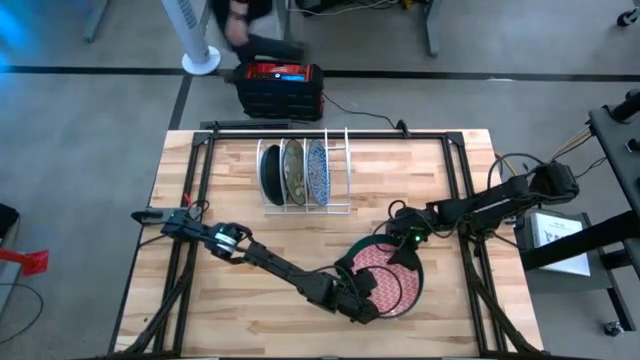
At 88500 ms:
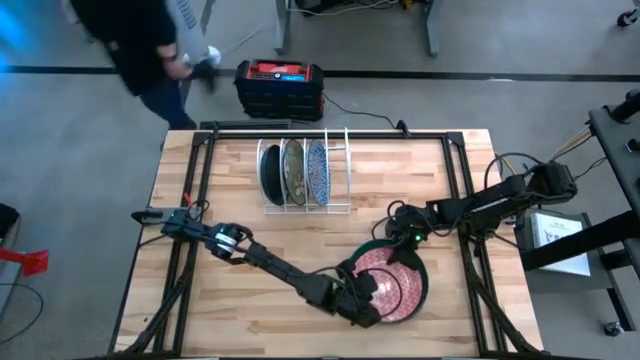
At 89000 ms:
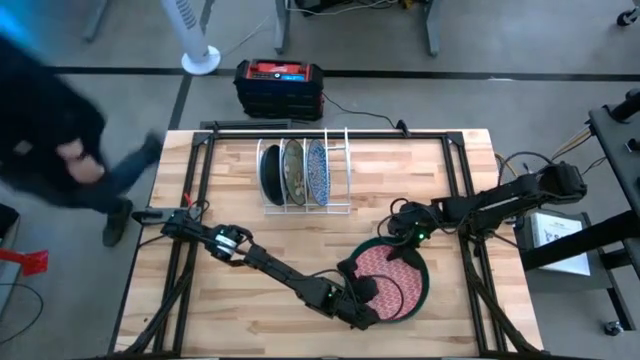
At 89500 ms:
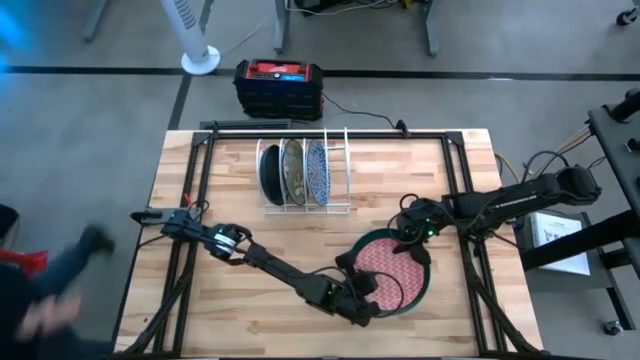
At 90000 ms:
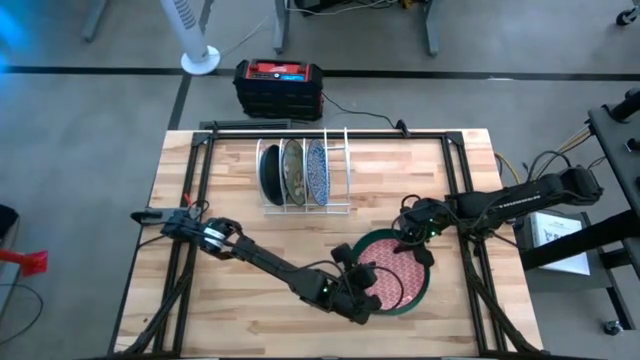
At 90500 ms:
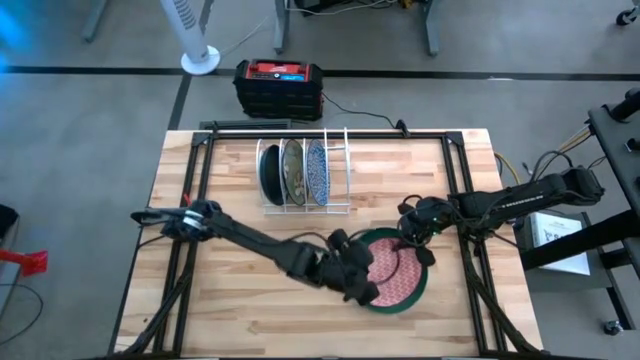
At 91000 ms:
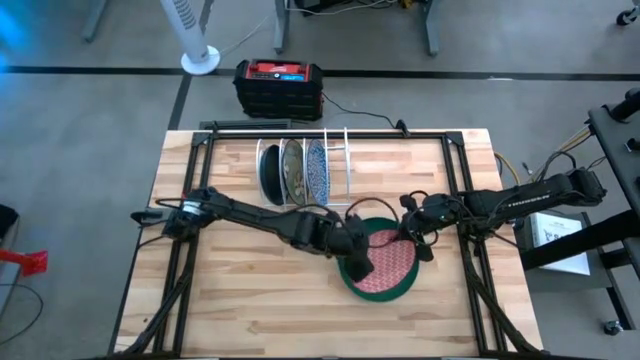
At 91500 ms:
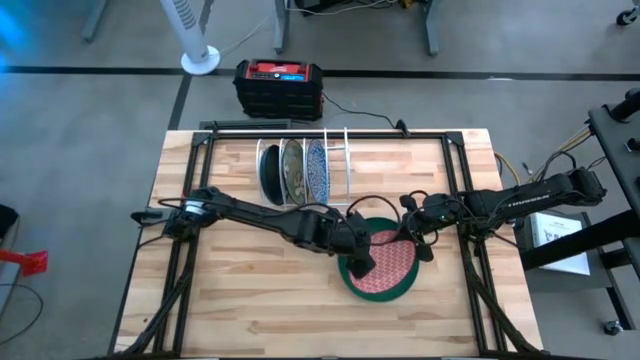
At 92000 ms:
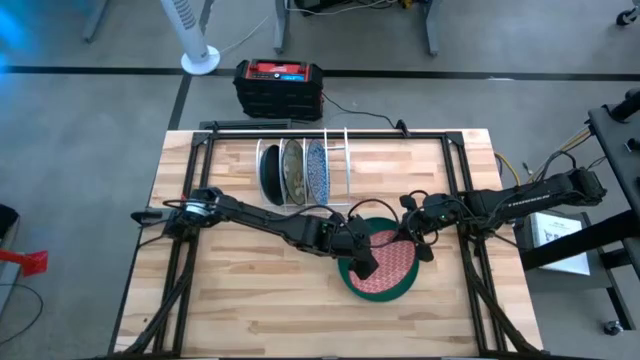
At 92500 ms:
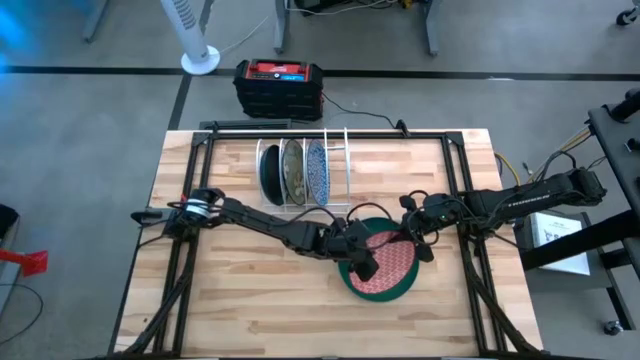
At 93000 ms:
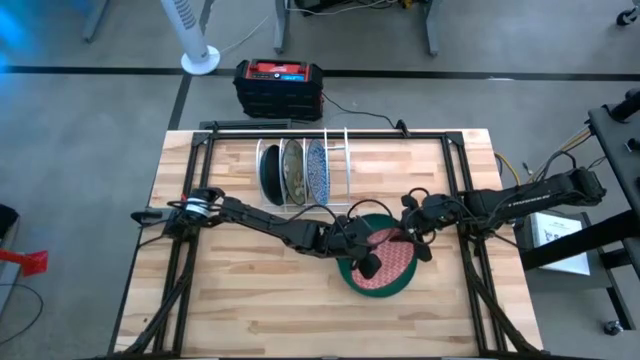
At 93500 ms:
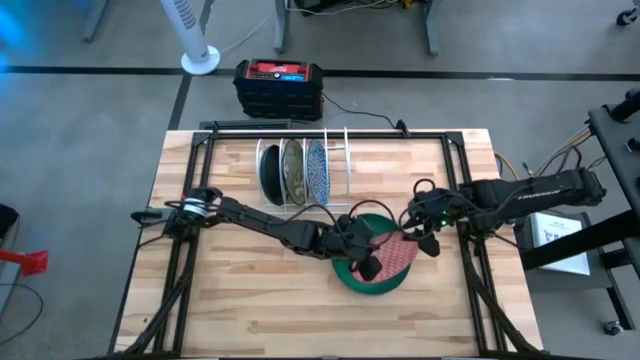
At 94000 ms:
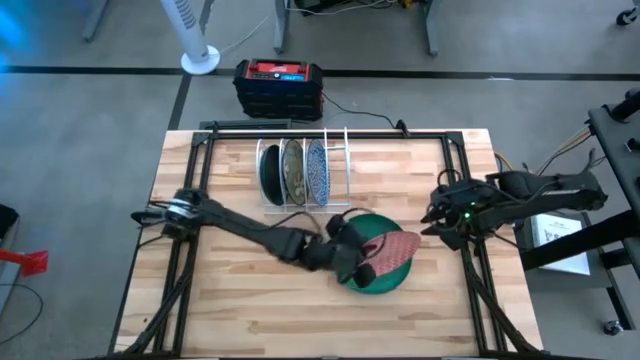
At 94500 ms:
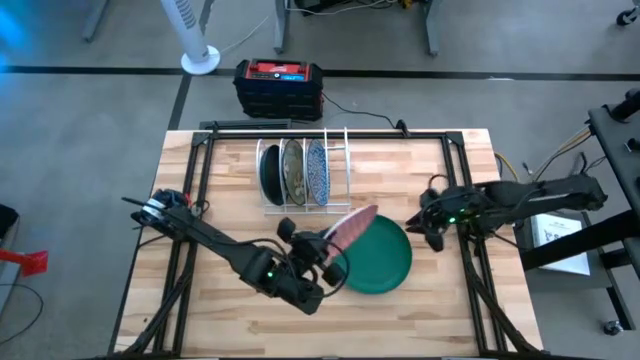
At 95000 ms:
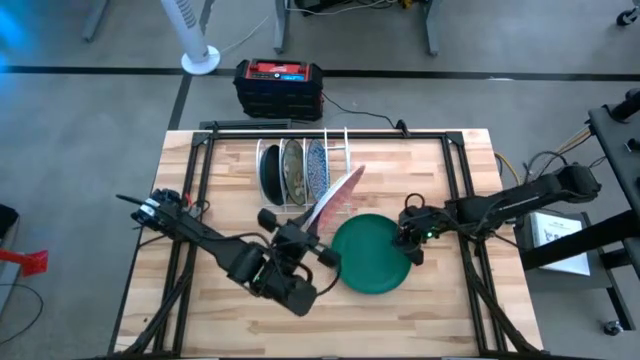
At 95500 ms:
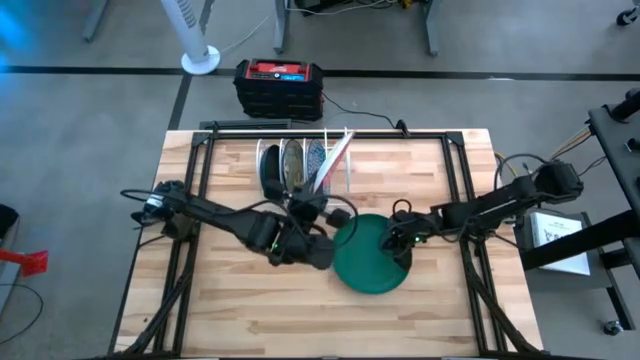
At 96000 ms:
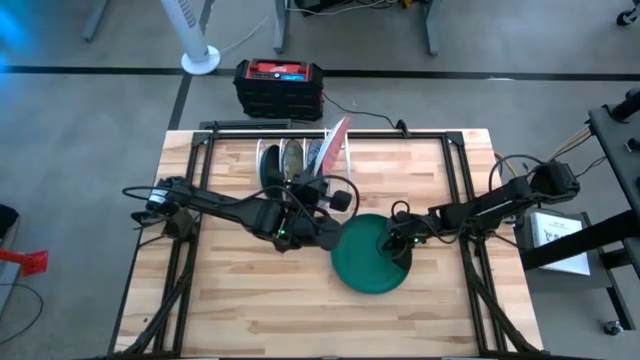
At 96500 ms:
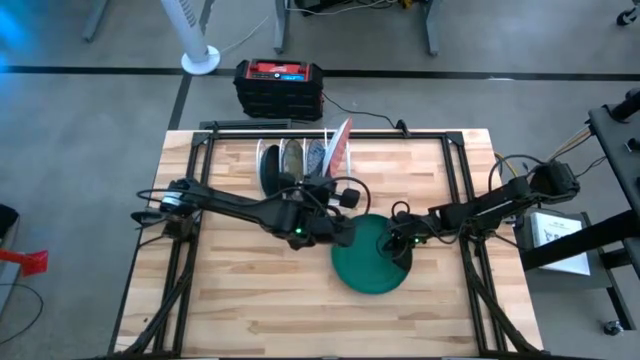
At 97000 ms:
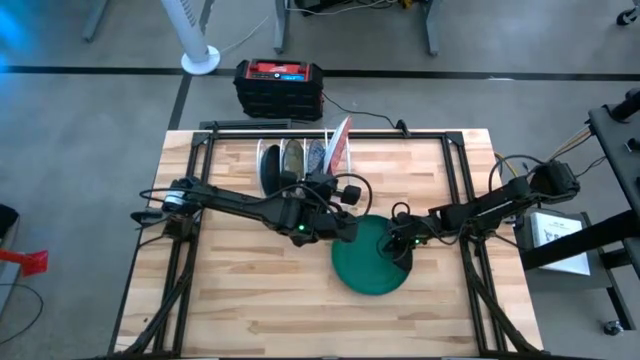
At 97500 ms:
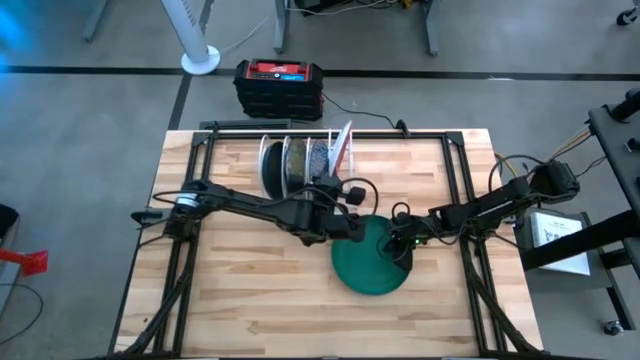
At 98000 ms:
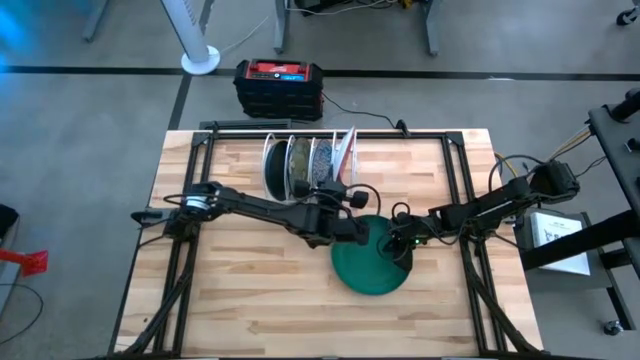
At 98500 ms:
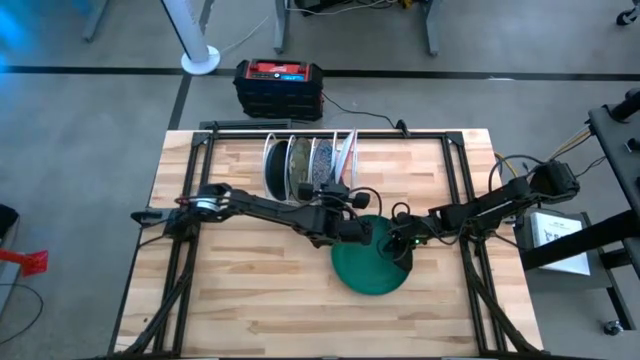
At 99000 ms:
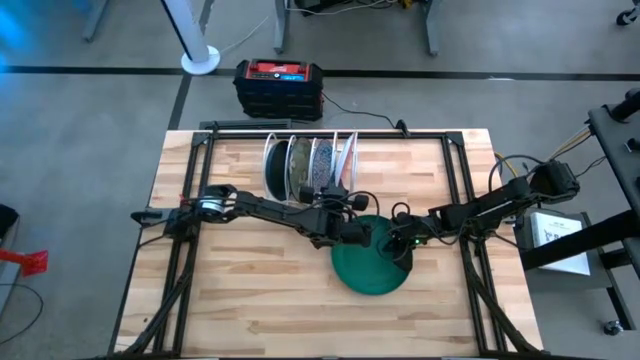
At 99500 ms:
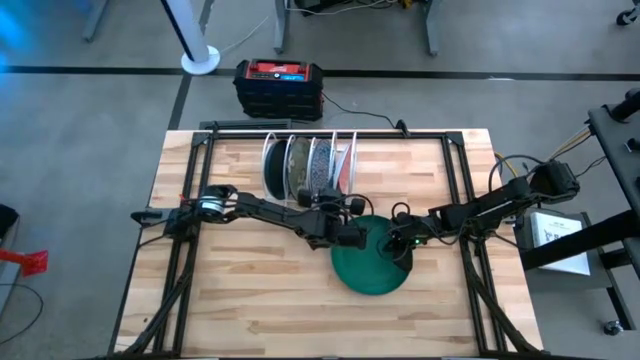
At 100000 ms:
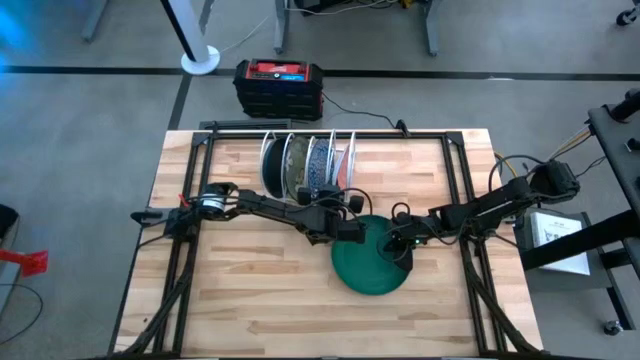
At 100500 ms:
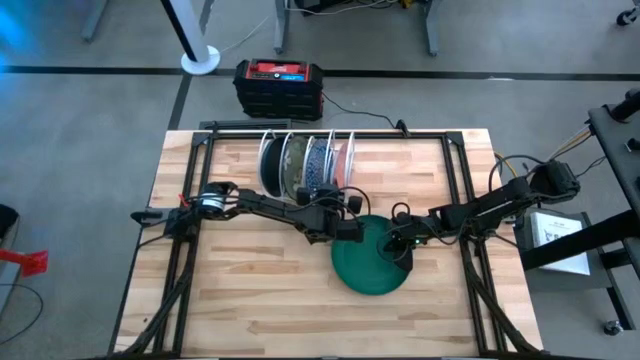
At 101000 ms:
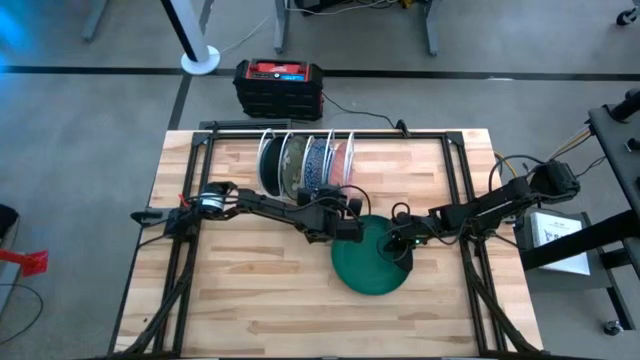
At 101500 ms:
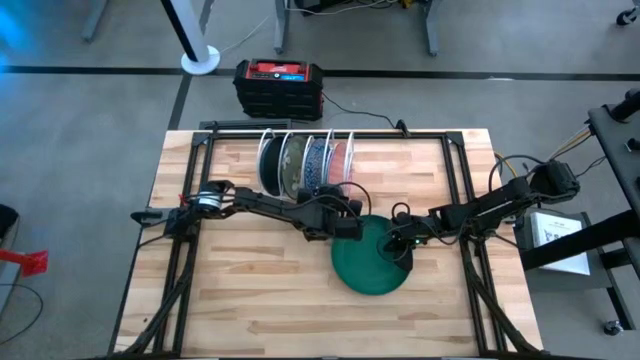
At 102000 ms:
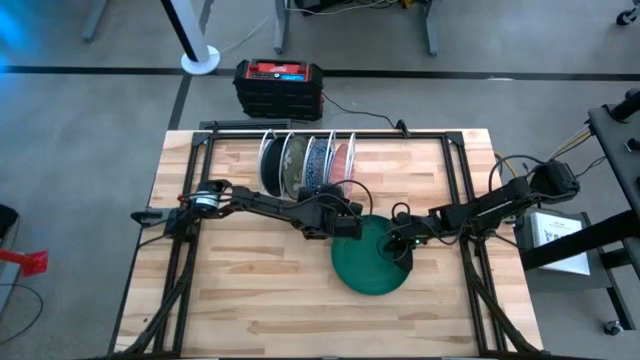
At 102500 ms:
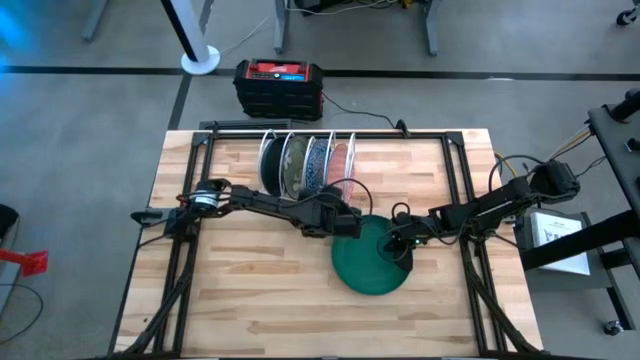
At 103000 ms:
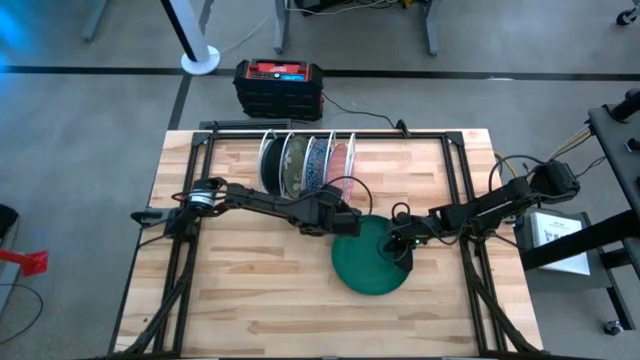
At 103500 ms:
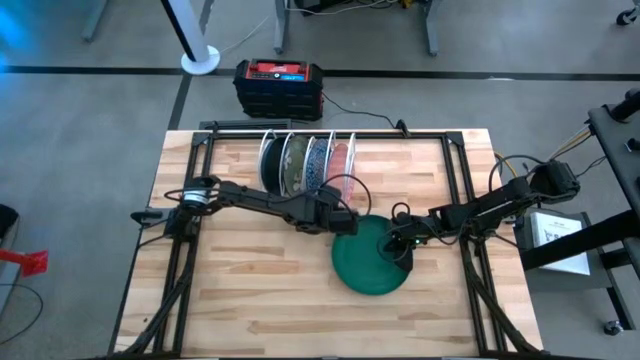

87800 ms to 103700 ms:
Task: Sort dishes
Put the orange pattern plate into the white dish rack

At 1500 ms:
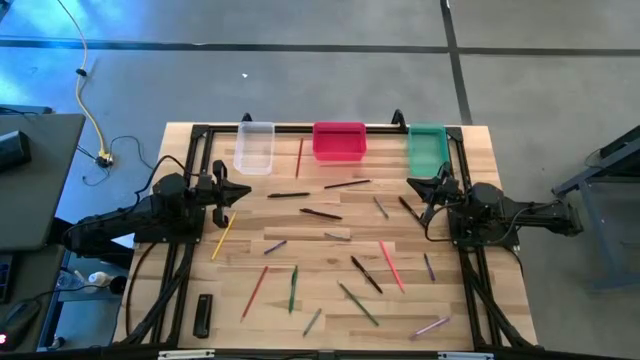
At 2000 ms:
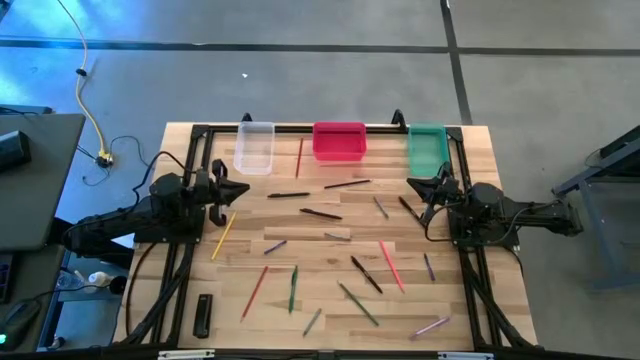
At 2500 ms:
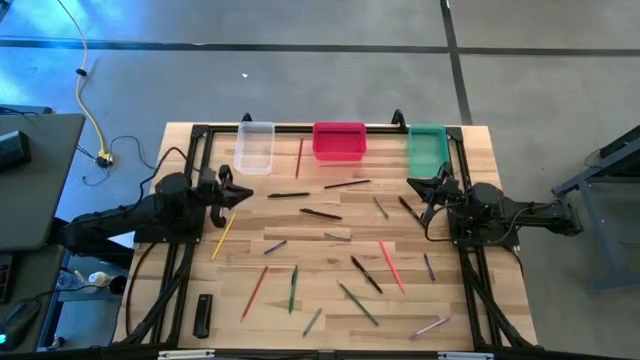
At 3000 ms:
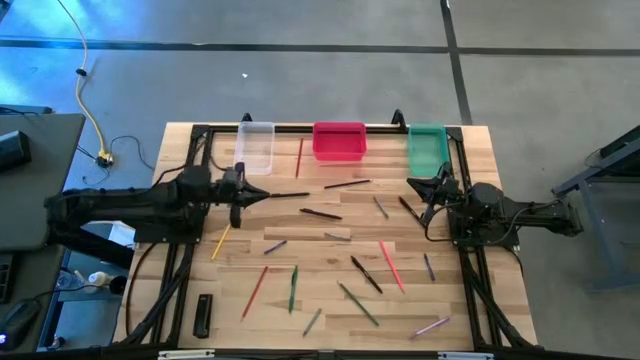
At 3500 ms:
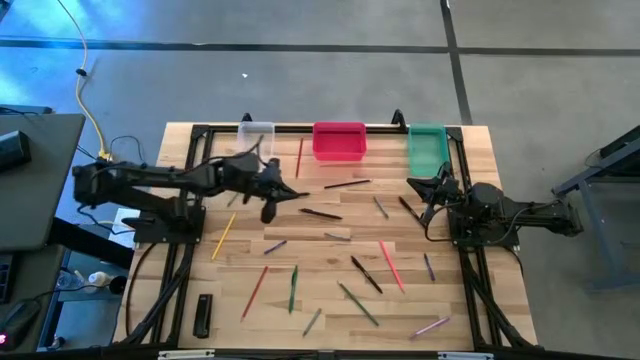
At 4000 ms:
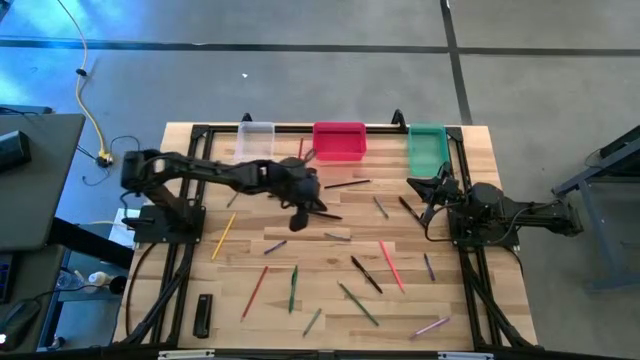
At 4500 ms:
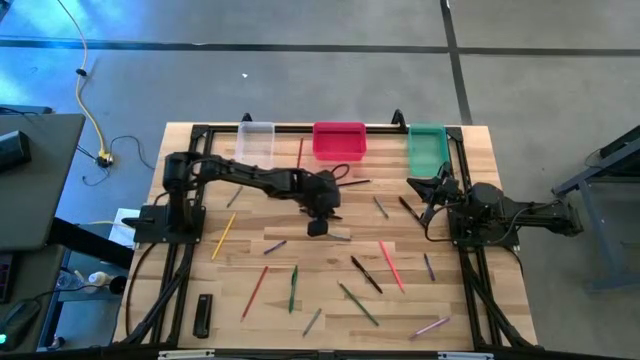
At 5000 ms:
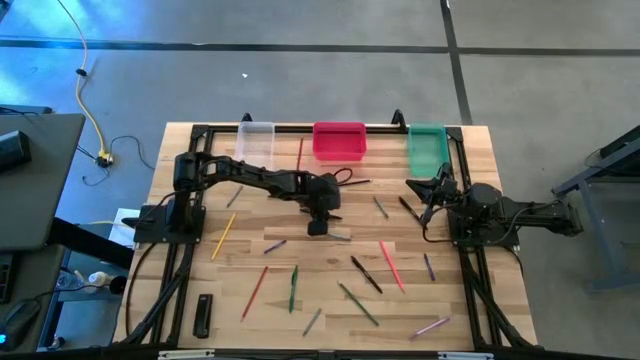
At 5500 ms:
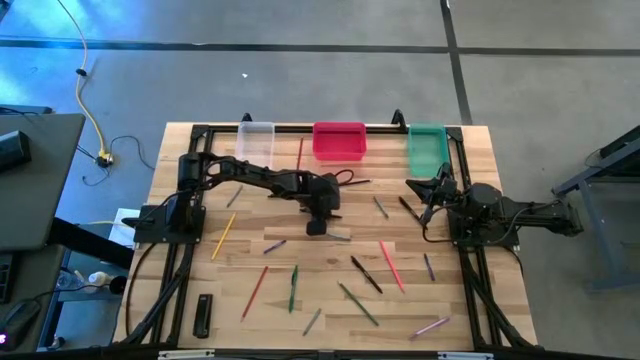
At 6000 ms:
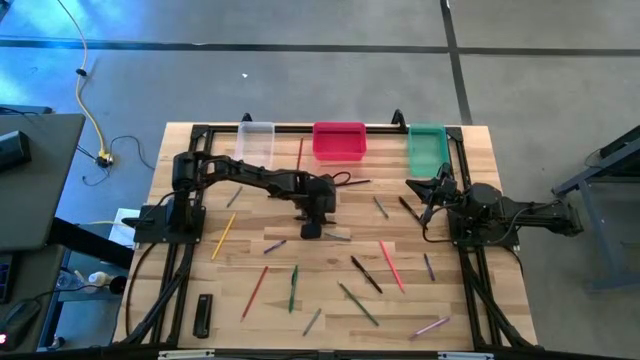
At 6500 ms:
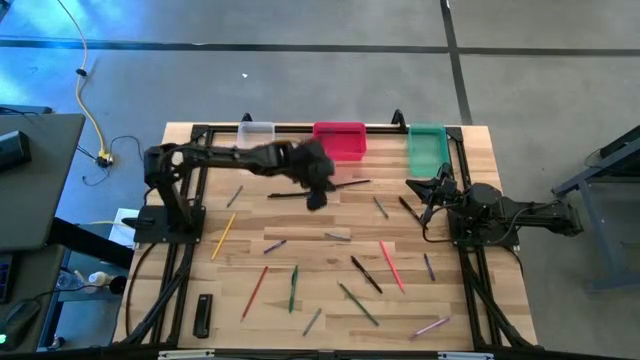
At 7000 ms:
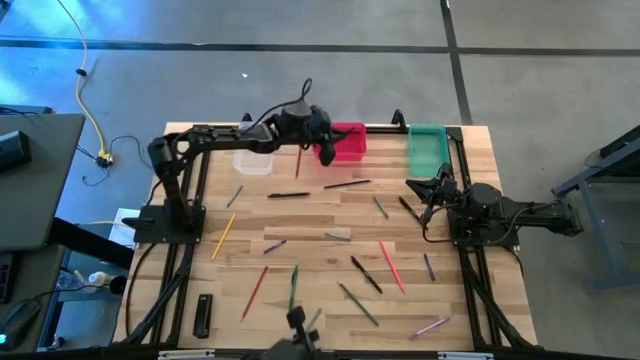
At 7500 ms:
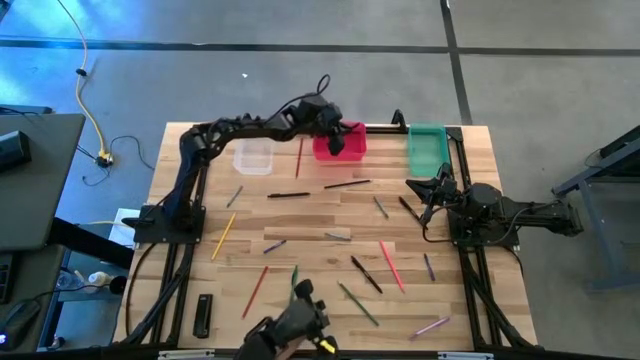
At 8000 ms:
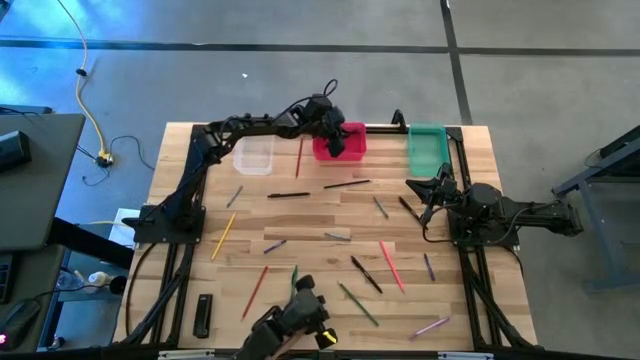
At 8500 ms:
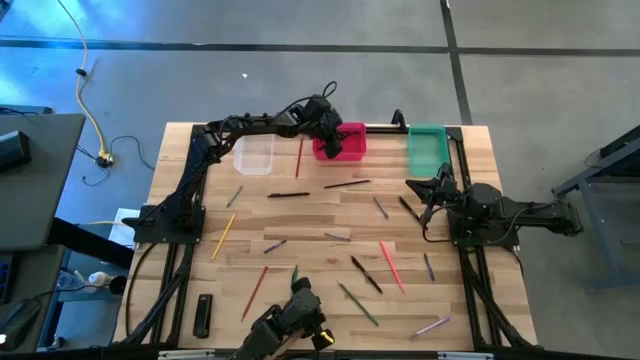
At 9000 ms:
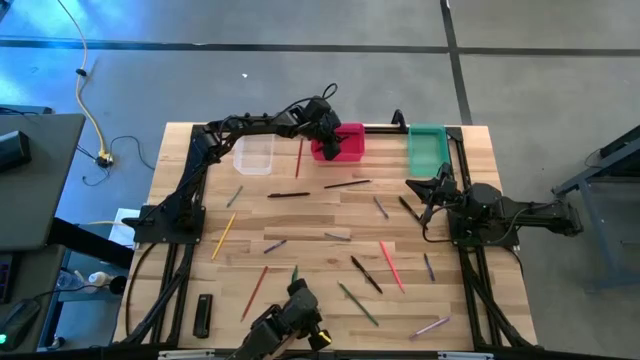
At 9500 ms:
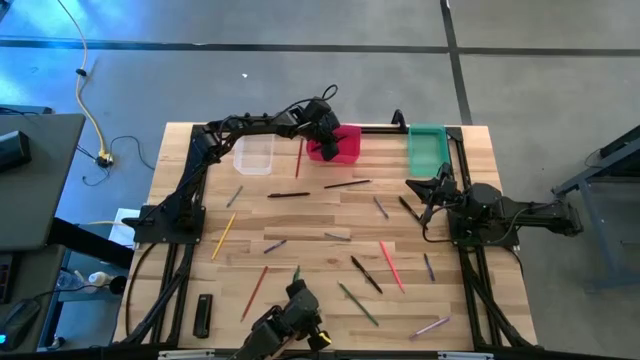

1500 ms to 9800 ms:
Task: Sort crayons/erasers/pens/pencils in bins
Put the black pen into the red bin
